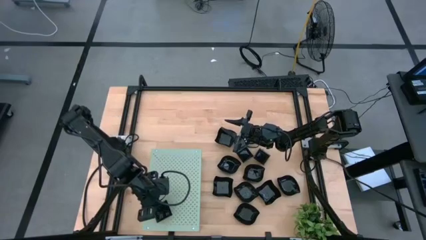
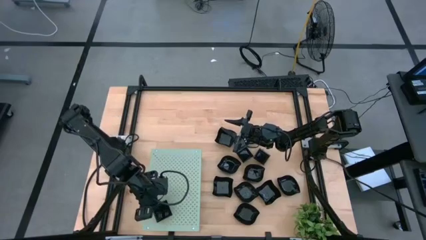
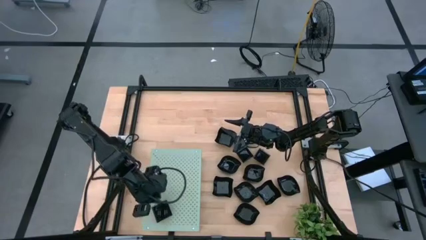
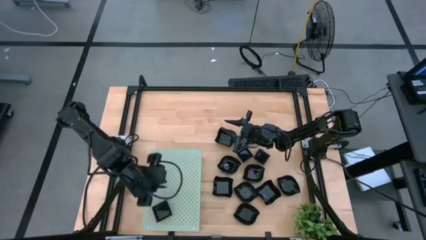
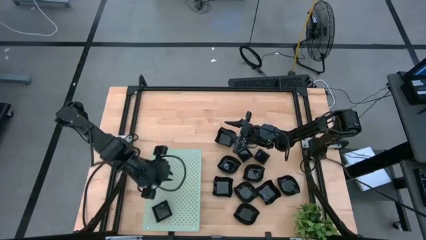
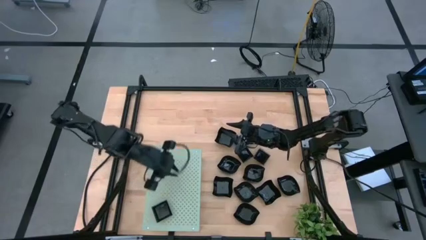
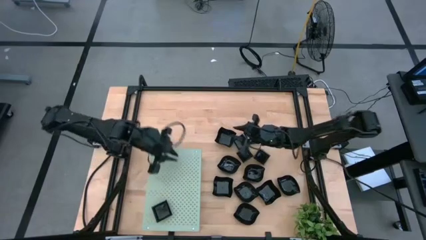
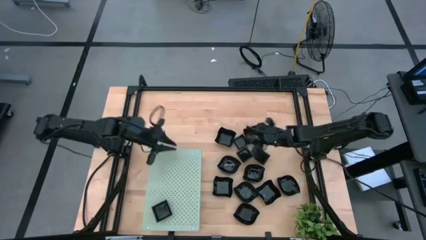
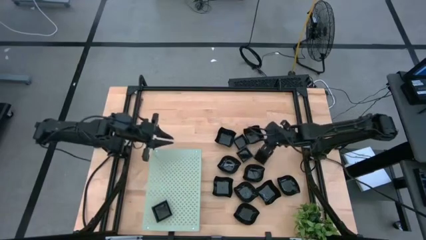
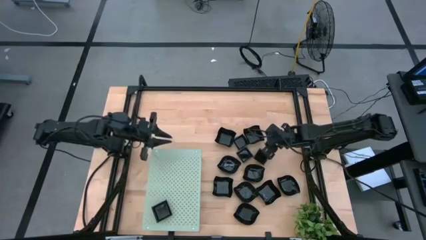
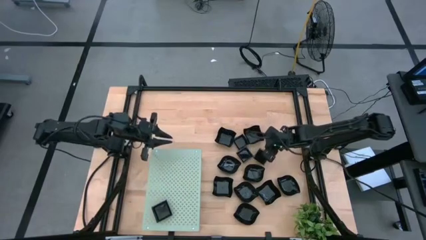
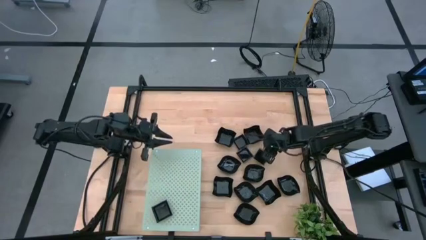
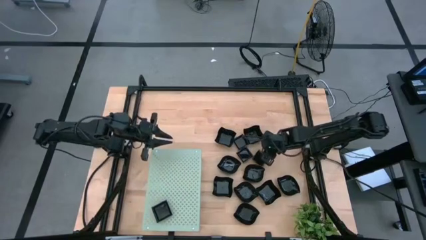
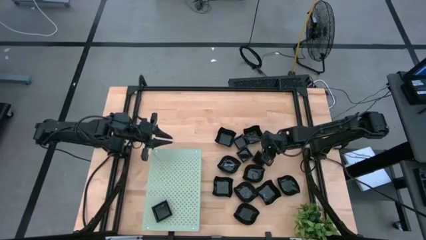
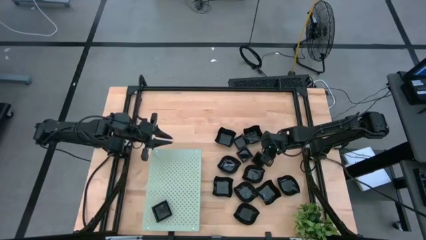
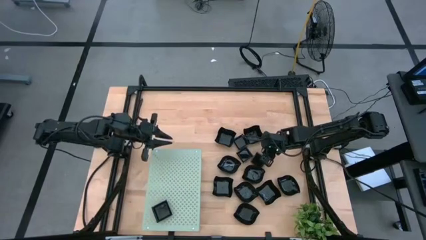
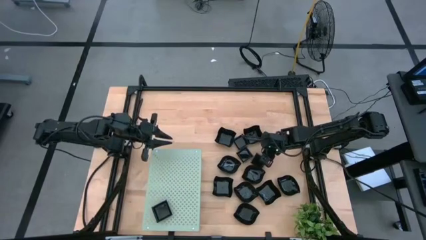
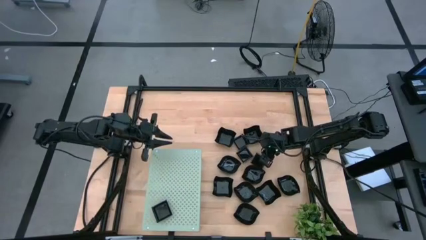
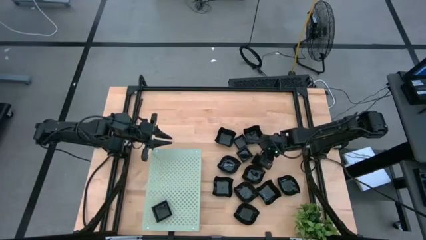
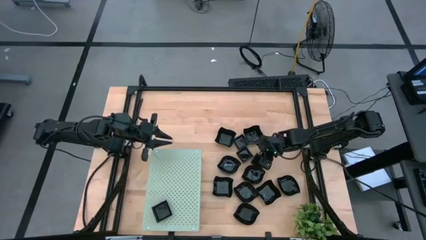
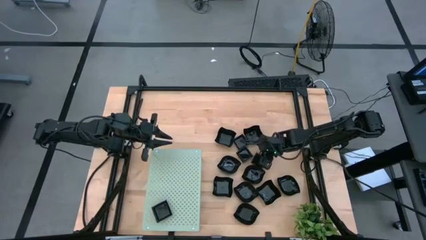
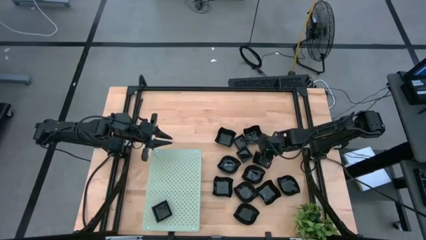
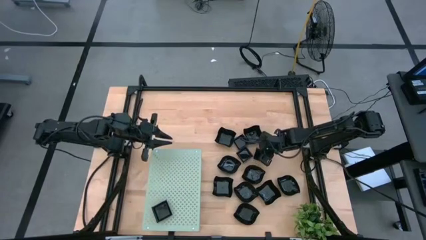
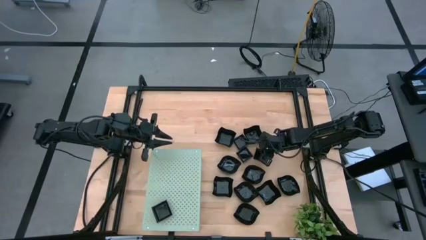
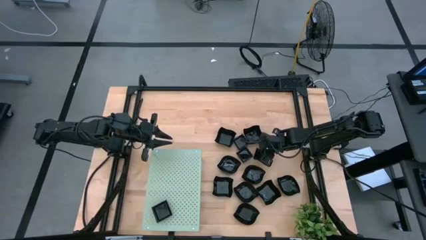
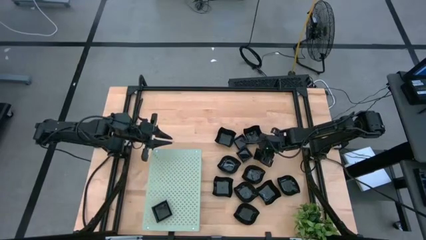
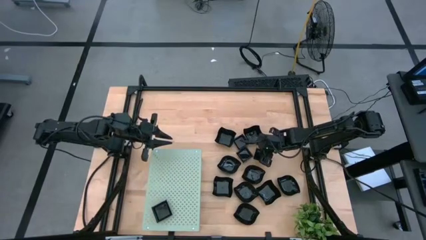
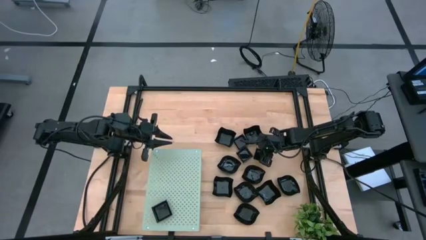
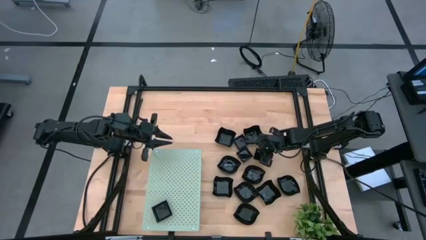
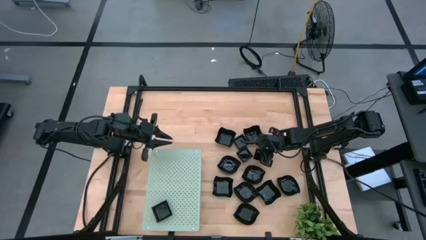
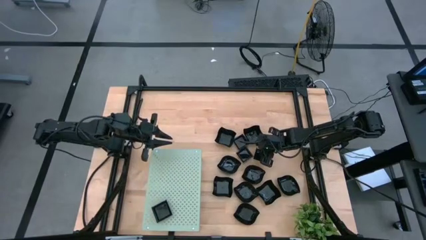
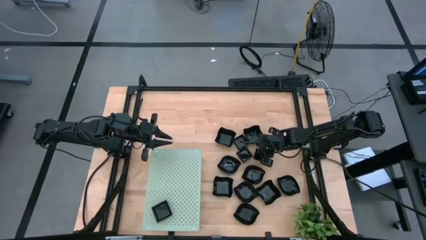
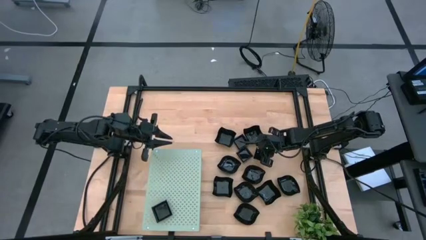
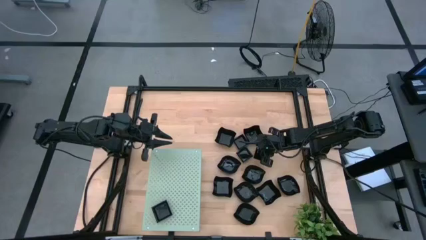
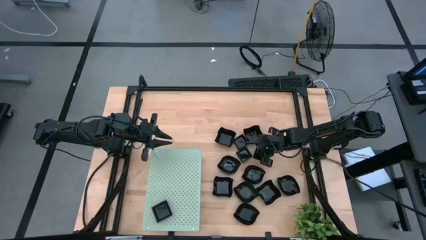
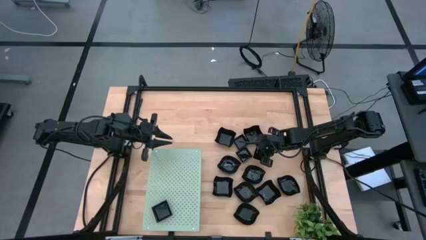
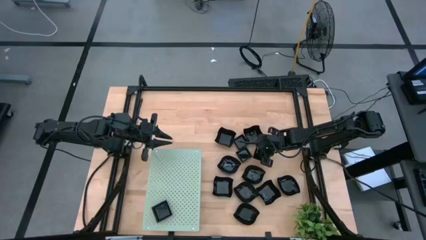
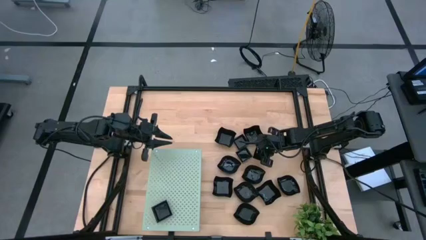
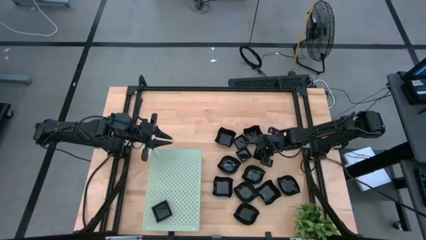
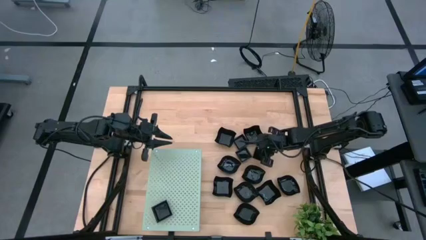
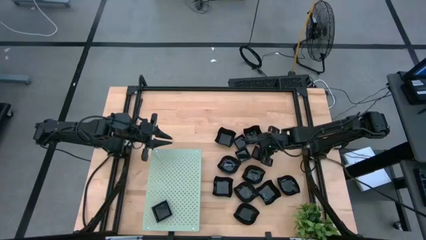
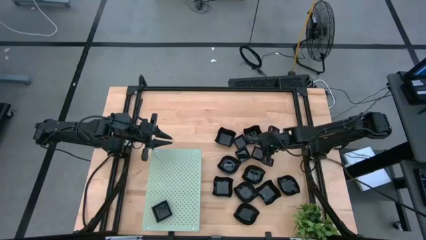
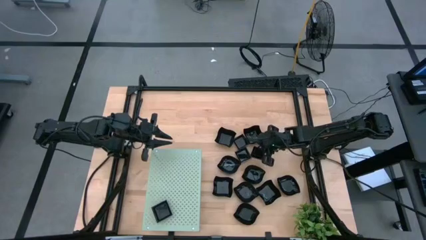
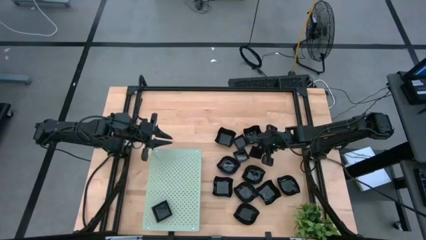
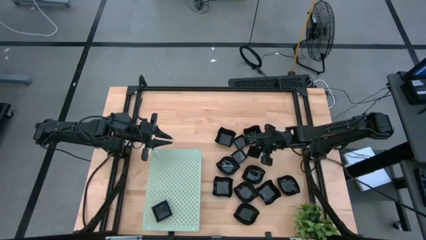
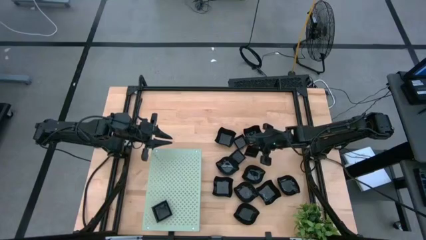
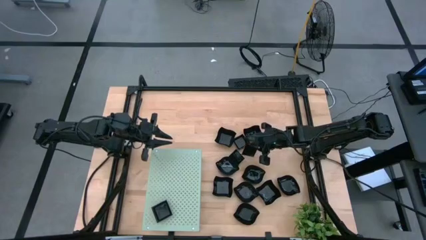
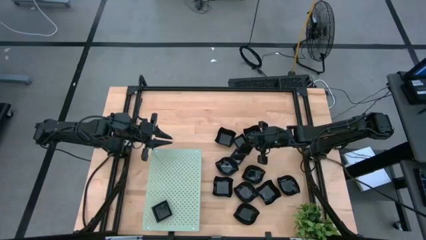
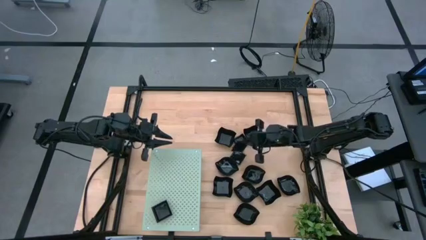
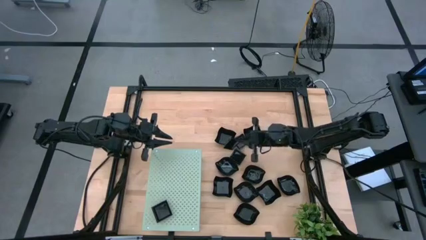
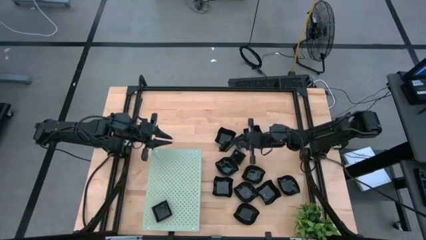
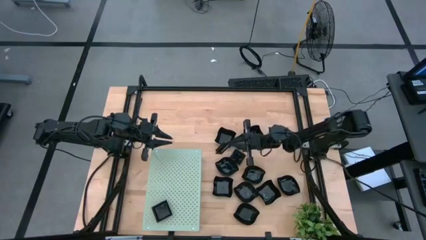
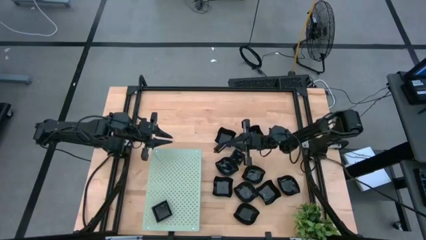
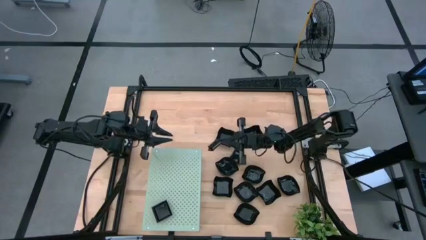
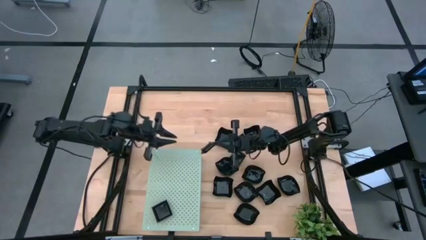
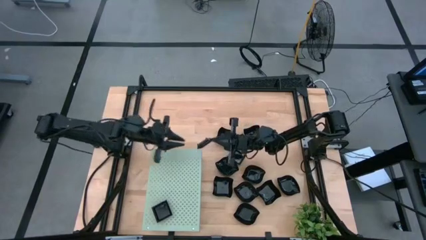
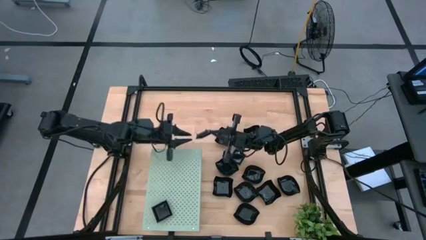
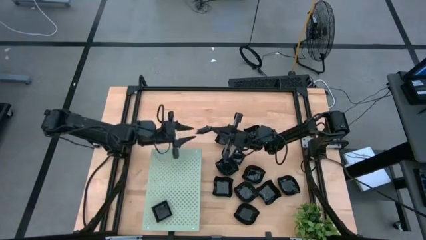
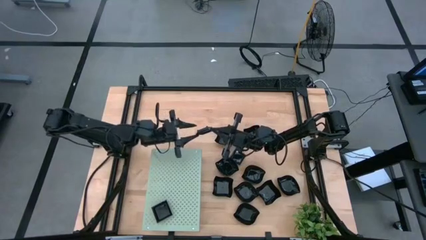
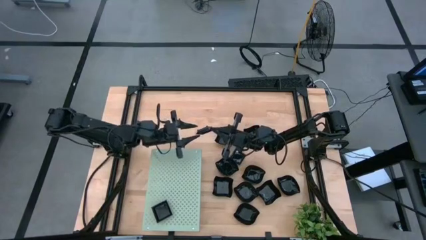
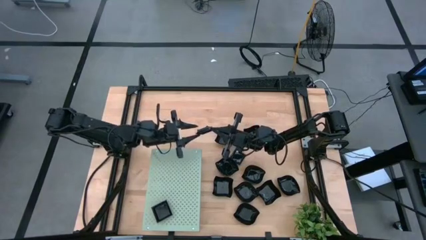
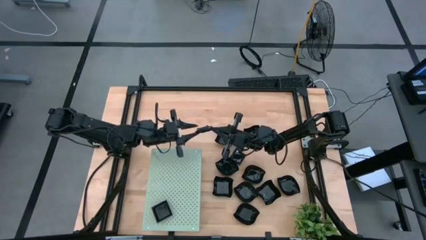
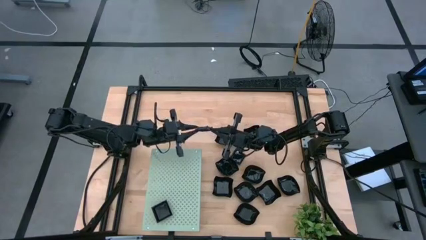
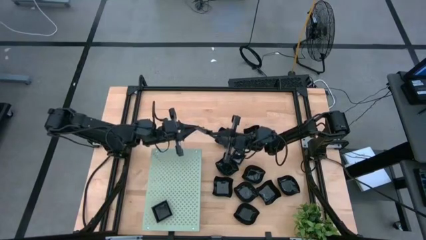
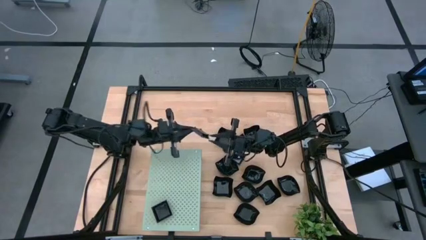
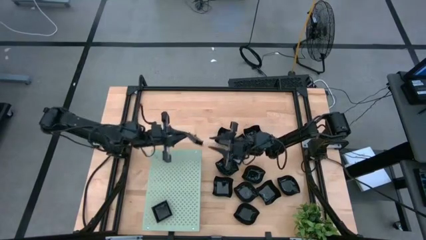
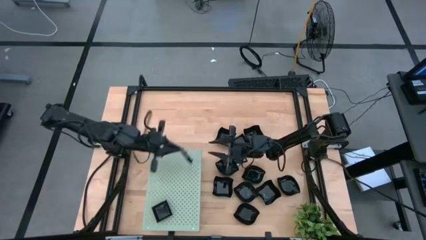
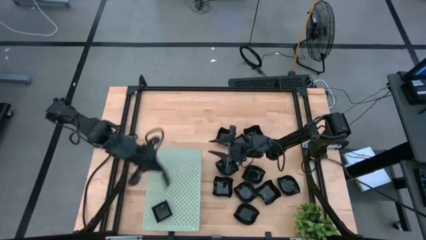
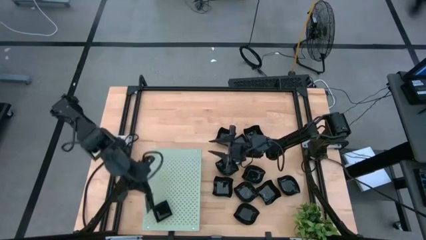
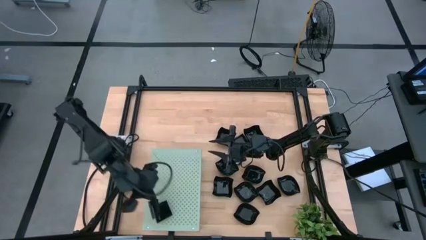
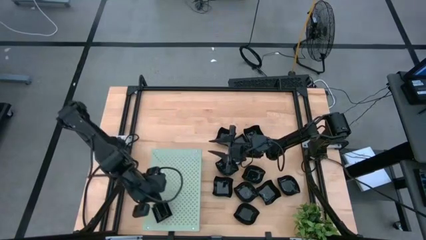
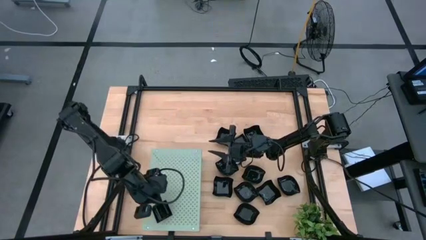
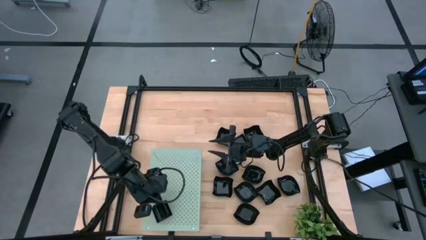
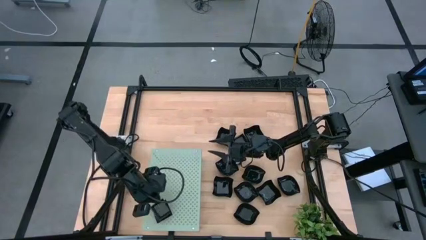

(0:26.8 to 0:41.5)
Task: Pick & Place Mini shaped plates
Stack the square plate on top of the other square plates on the shelf
